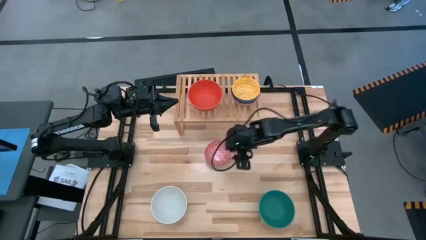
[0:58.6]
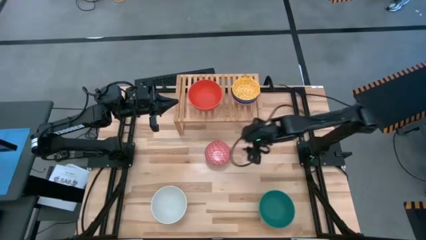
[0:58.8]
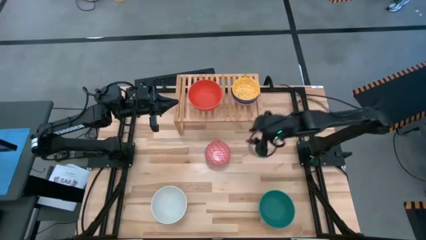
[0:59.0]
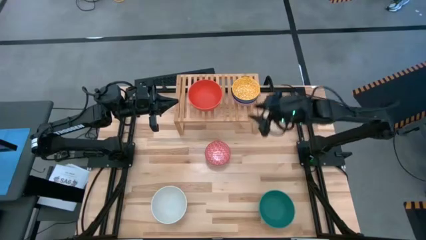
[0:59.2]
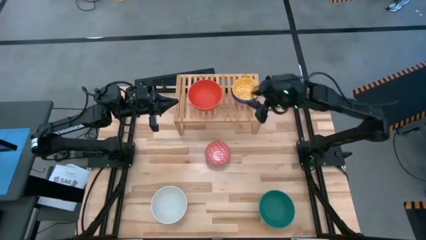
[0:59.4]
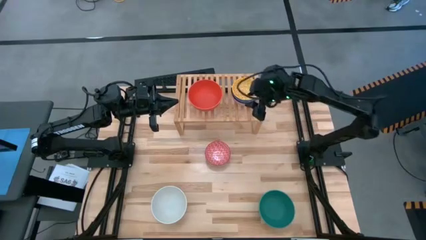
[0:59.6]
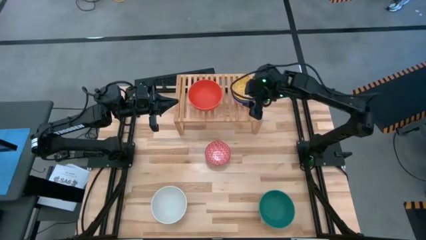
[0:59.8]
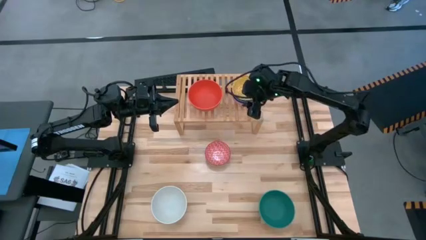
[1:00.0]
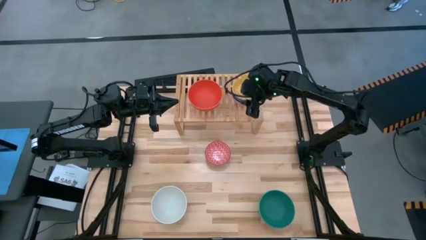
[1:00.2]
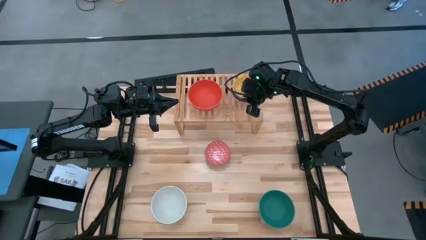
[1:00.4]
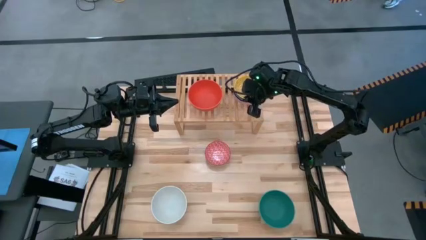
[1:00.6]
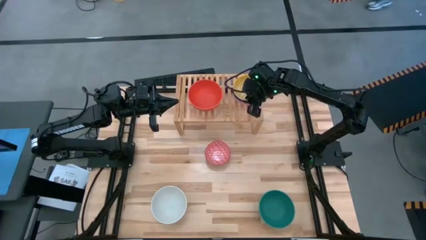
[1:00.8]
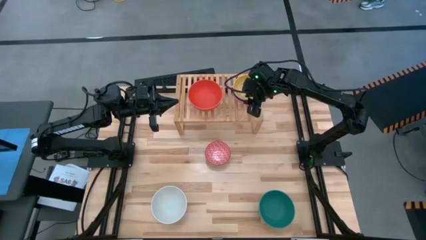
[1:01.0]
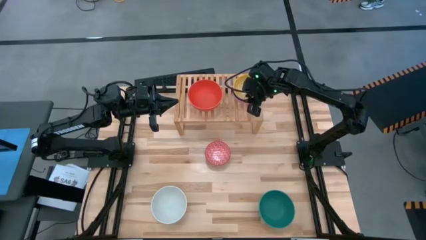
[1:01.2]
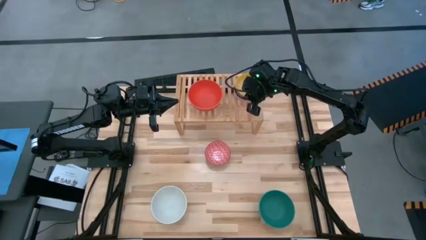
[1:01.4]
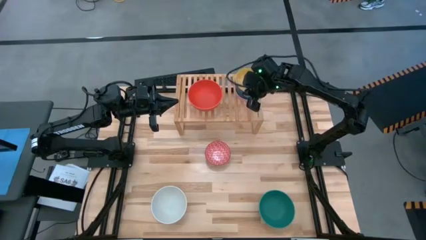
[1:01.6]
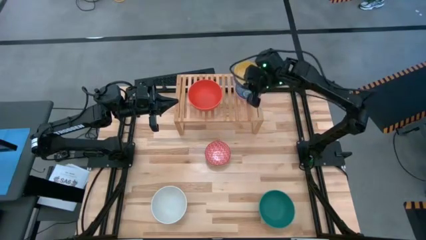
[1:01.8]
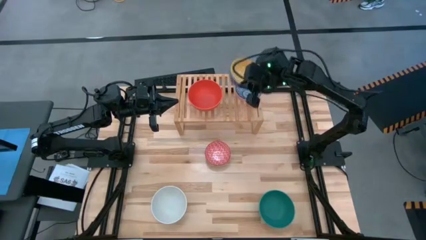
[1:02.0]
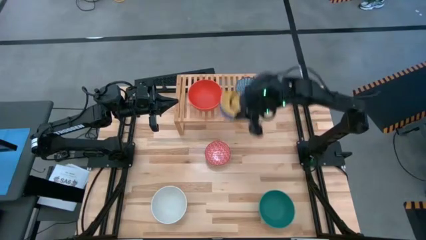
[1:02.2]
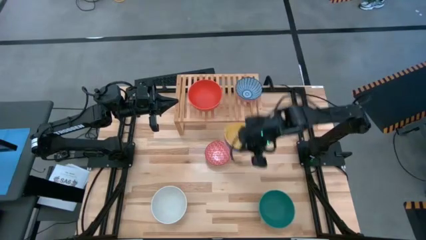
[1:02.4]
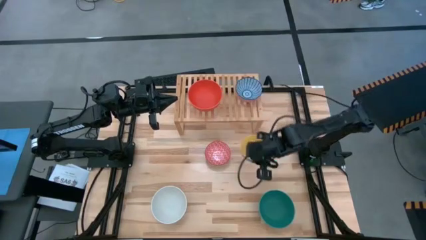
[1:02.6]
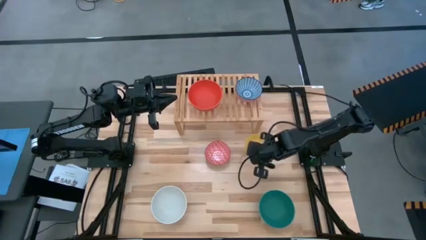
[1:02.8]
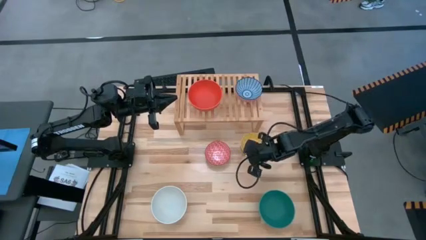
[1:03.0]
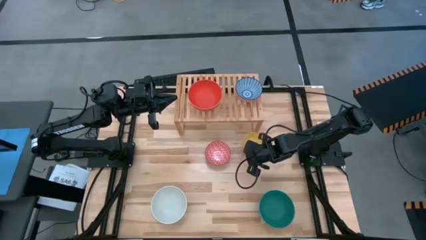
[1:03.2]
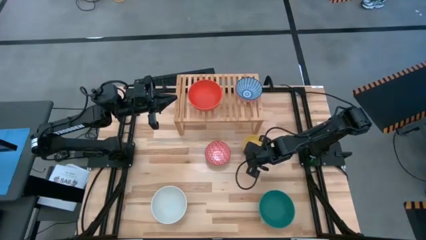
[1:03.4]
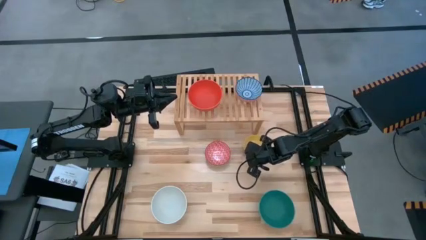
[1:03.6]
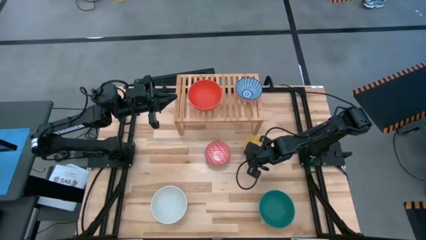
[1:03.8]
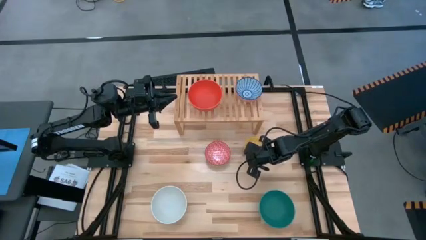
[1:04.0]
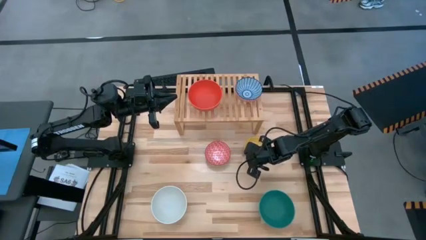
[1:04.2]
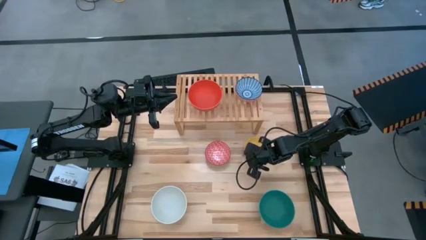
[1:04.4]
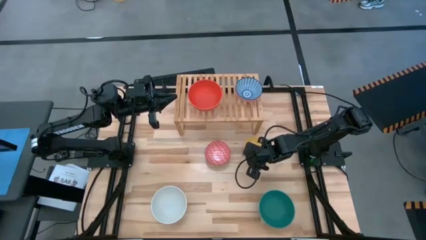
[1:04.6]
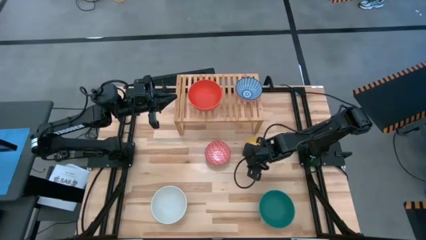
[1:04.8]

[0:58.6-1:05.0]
Task: Place and stack bowls onto a shelf
Remove the small yellow bowl from the stacked small bowls on the shelf

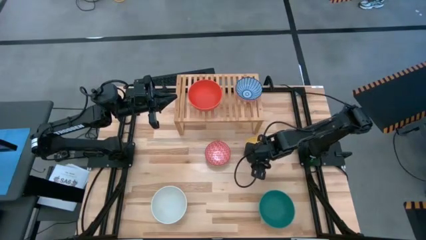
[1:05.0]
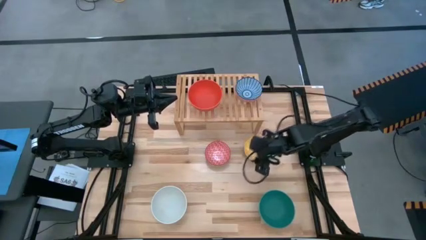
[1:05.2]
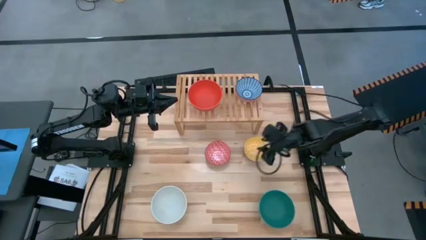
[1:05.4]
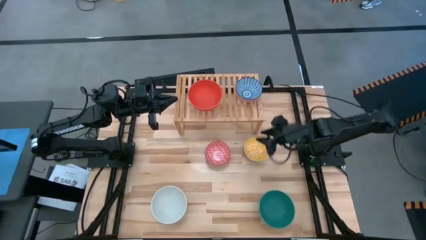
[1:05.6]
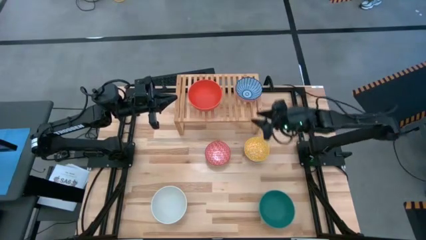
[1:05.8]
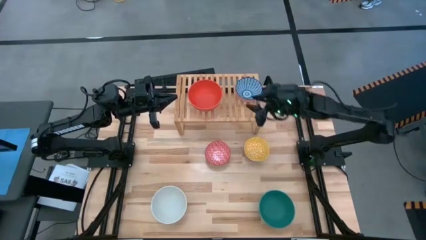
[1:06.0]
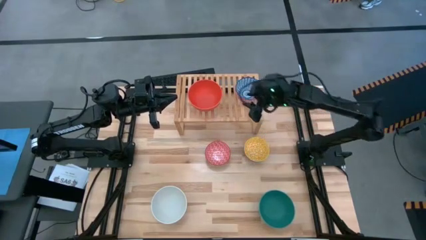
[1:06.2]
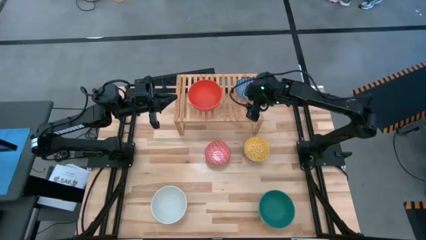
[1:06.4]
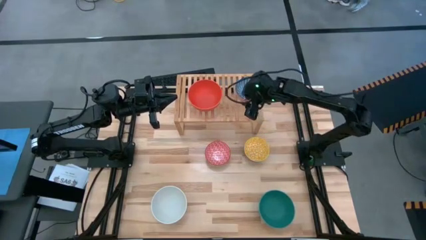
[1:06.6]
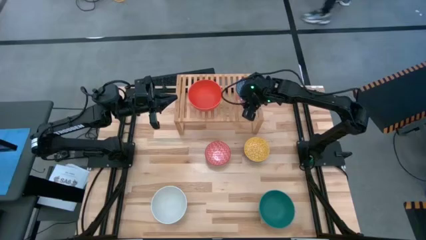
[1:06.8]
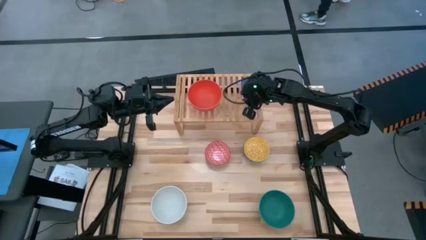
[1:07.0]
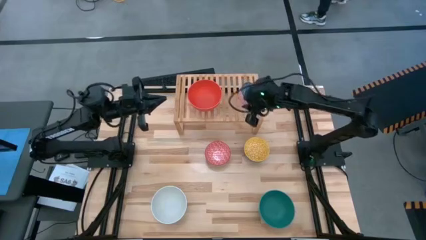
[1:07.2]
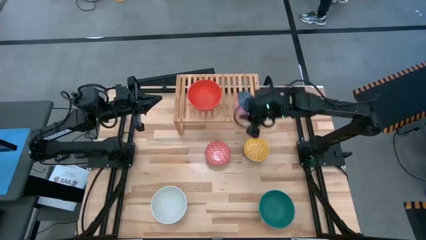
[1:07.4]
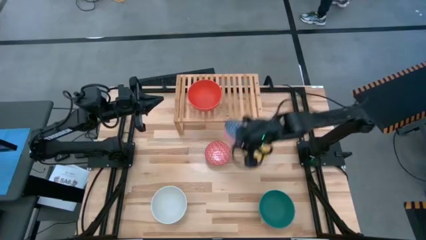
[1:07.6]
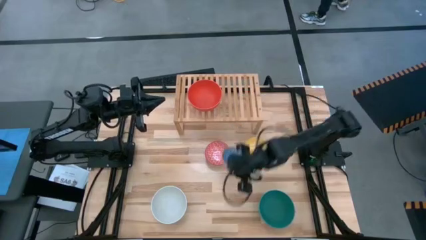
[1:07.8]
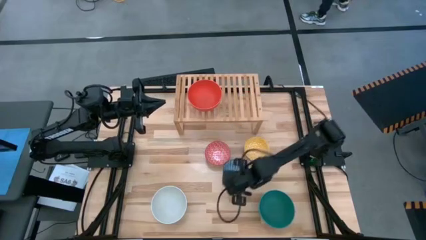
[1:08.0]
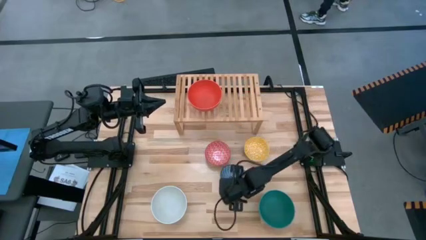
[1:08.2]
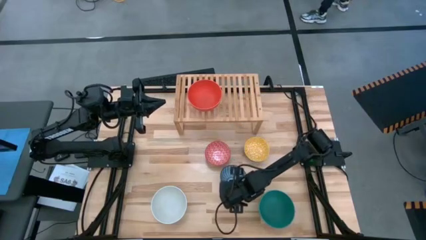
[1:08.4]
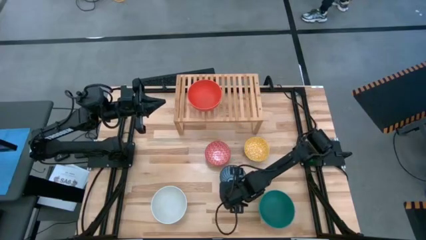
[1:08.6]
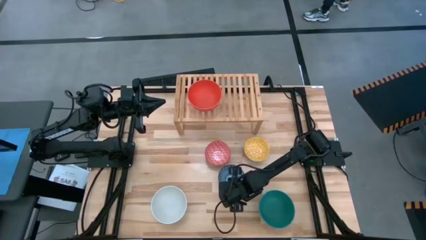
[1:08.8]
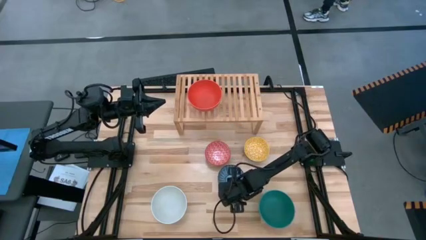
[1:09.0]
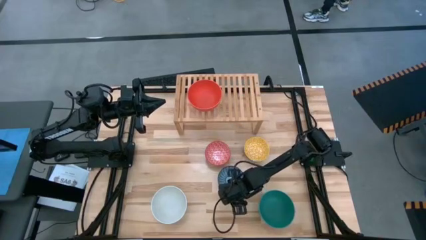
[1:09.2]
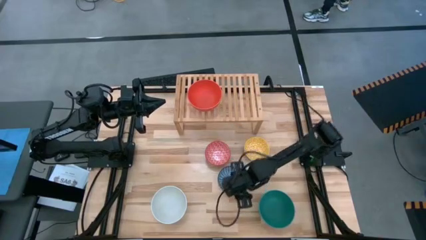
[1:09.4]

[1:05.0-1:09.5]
Remove the small blue bowl on the shelf

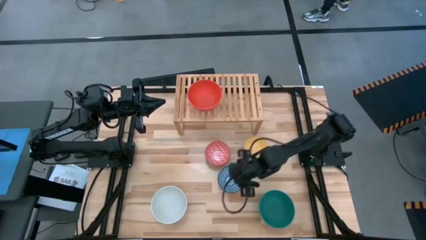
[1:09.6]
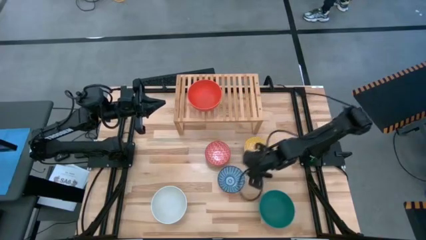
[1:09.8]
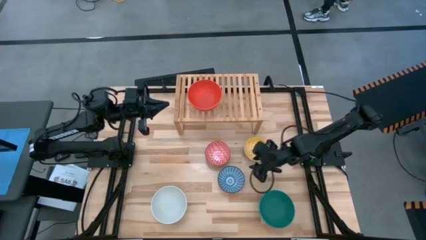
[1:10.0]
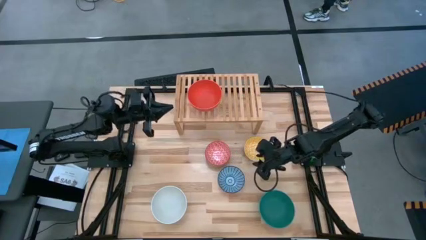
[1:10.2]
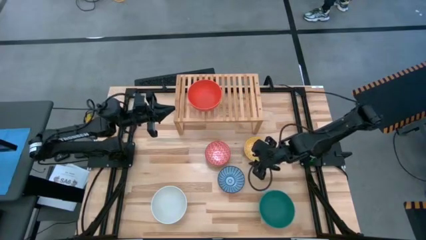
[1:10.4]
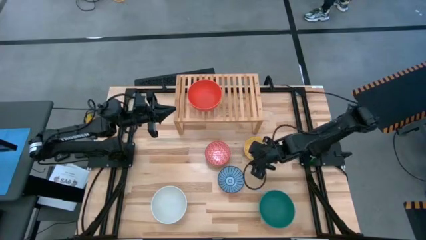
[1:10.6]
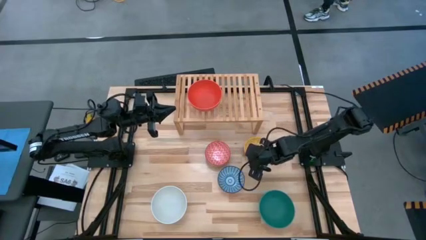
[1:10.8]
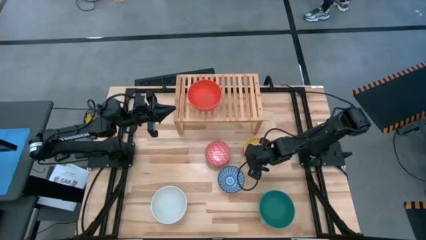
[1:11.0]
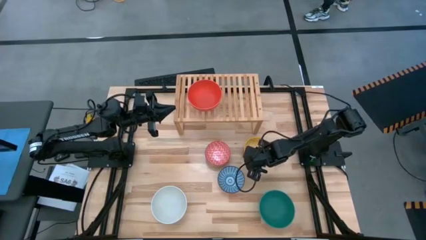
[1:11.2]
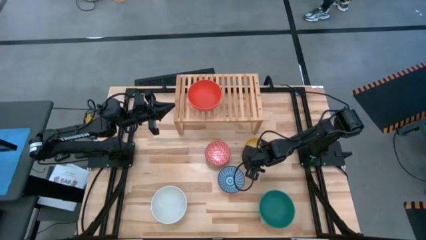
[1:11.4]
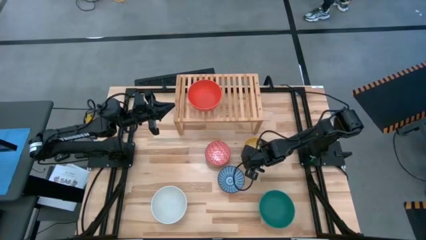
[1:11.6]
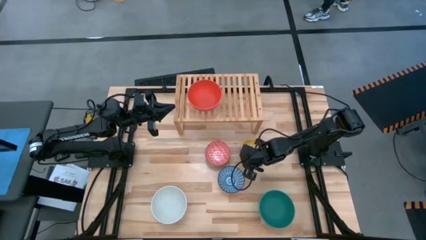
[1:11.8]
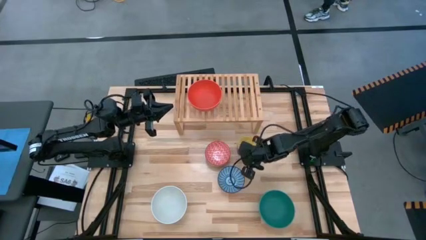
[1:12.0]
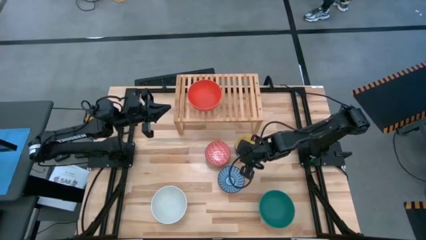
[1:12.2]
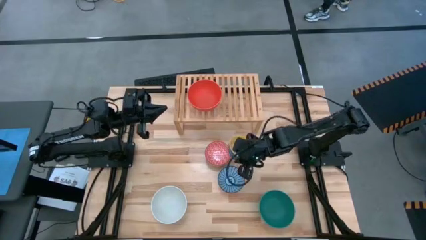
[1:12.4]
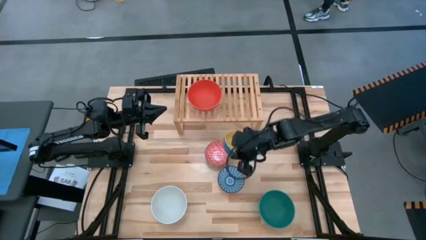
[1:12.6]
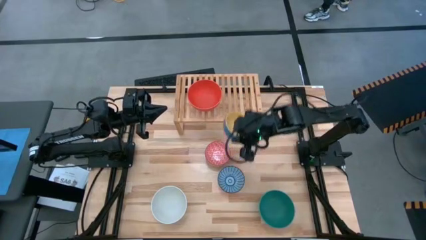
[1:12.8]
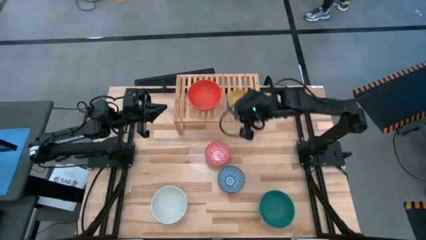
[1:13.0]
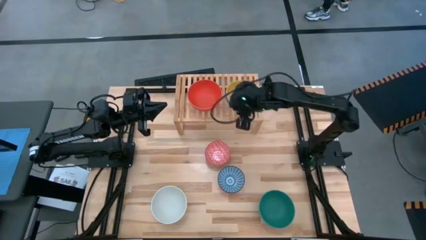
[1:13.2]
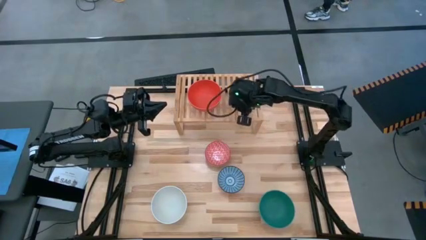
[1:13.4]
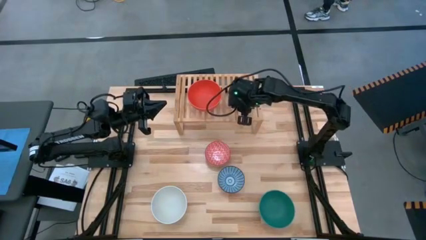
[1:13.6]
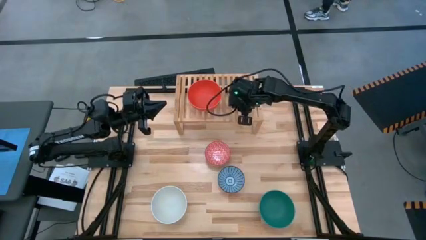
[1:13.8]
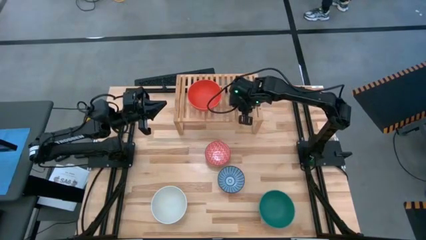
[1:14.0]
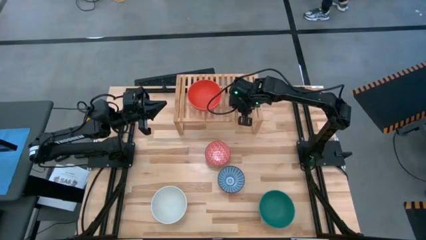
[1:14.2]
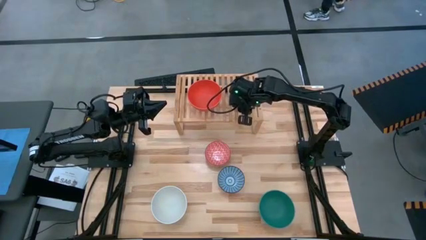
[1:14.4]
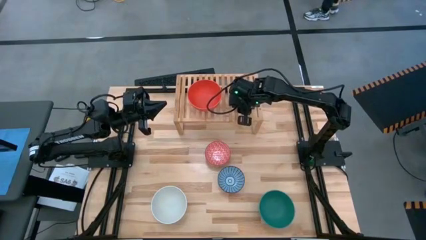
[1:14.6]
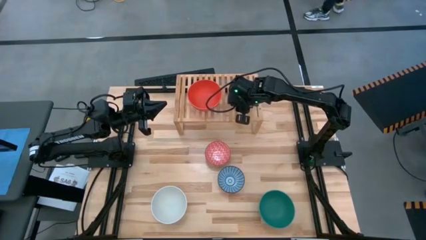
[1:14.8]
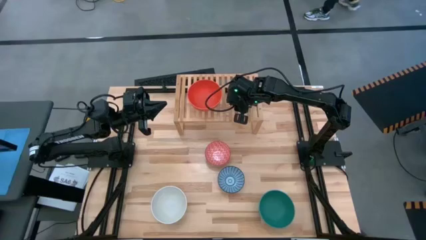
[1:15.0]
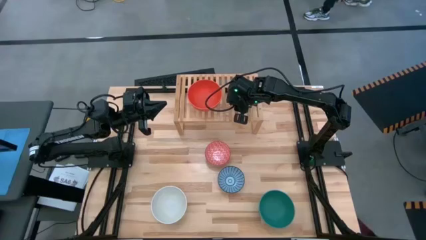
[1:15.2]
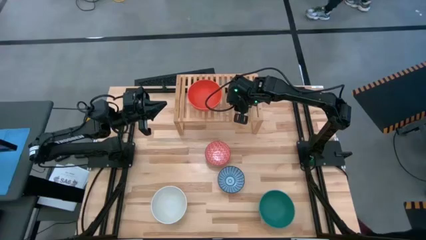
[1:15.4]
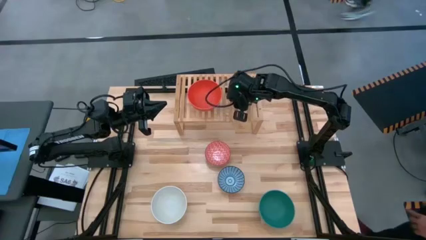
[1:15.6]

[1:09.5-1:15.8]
Put the small yellow bowl on the shelf
